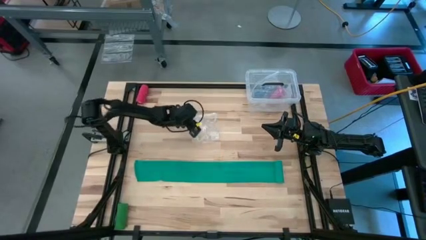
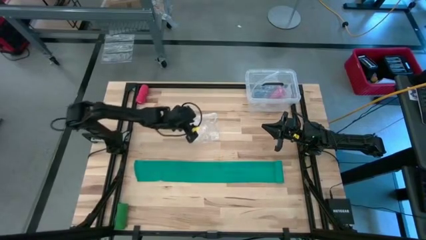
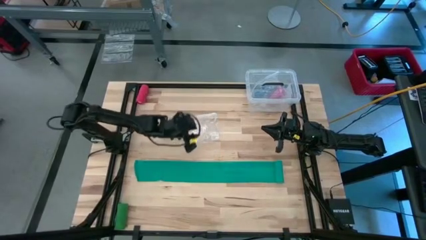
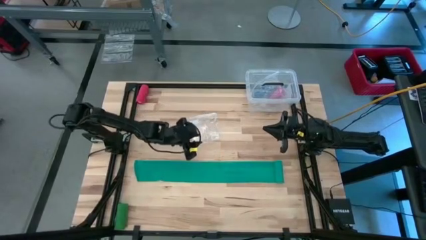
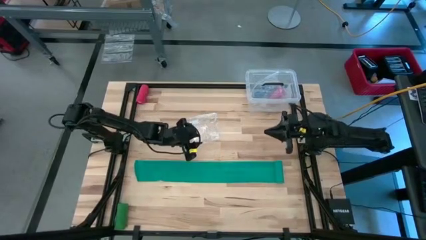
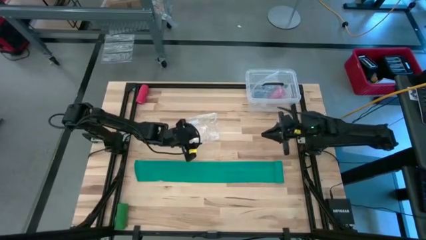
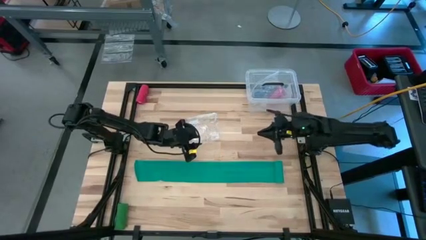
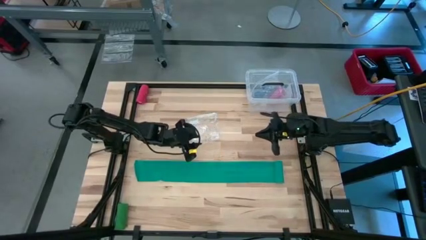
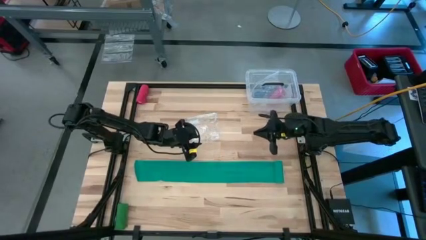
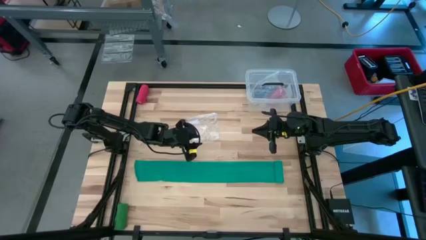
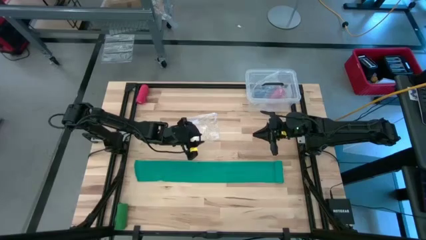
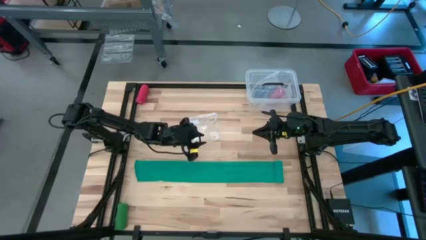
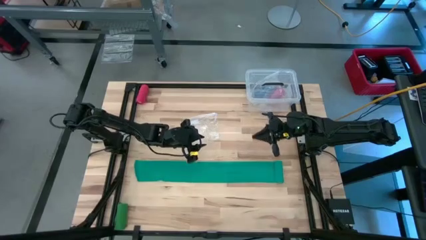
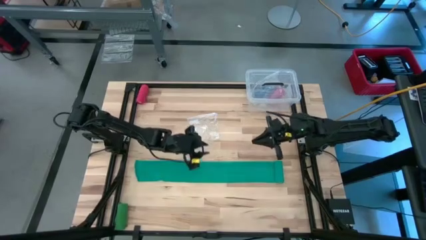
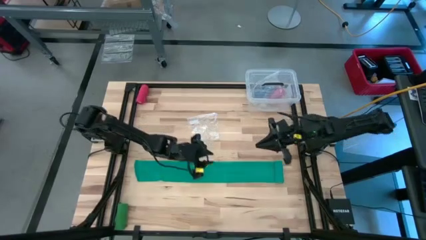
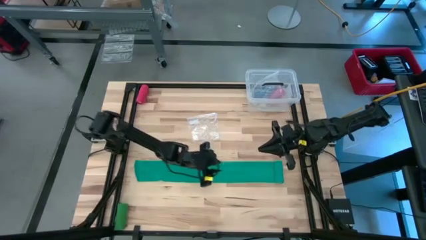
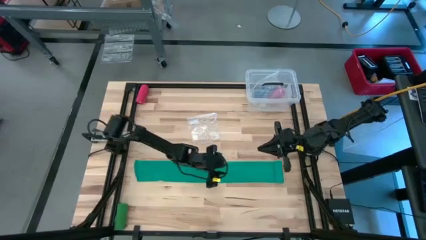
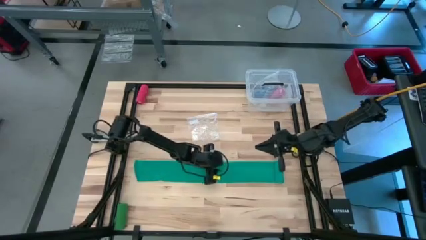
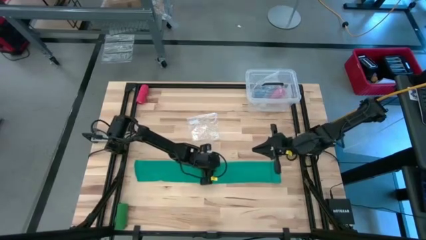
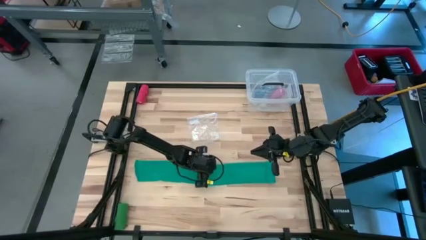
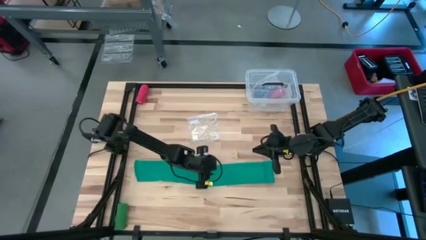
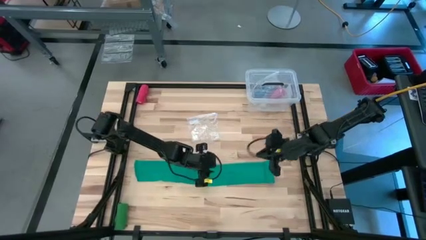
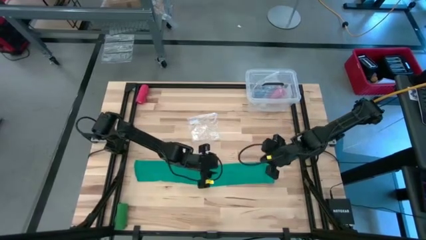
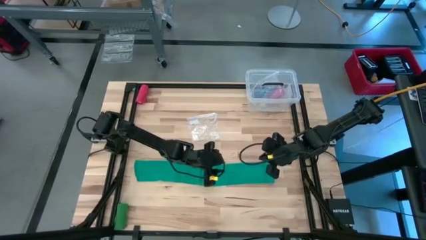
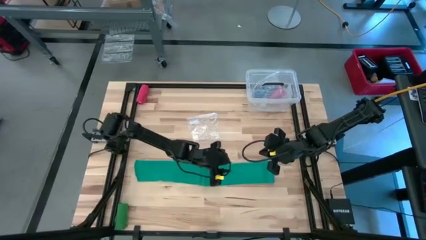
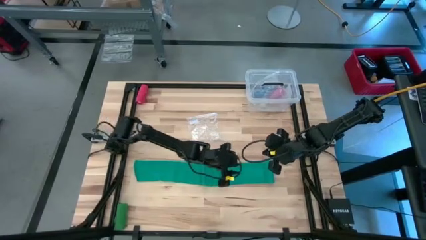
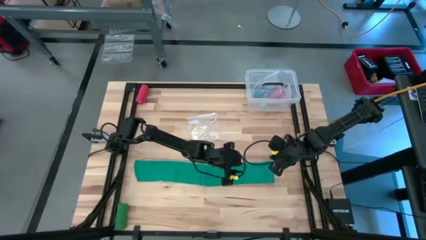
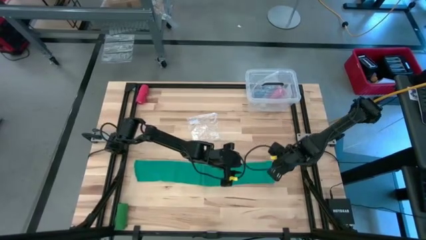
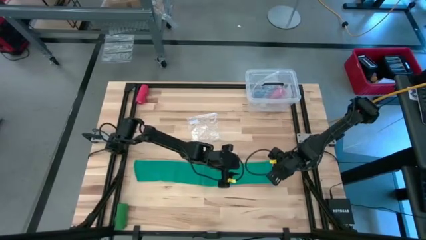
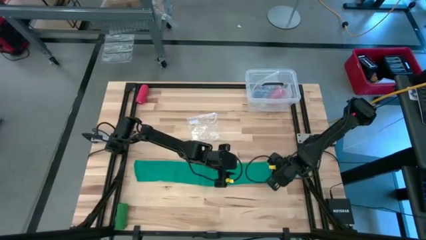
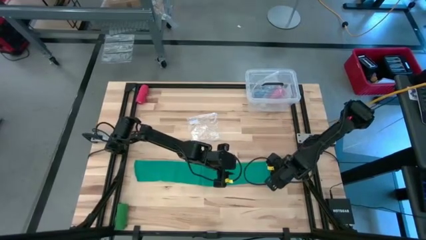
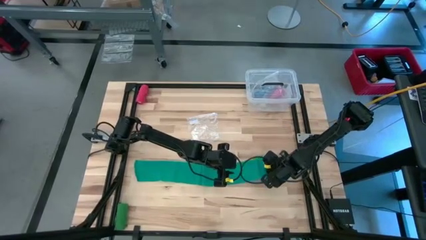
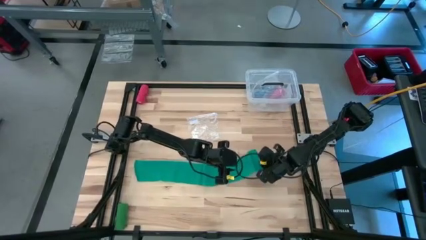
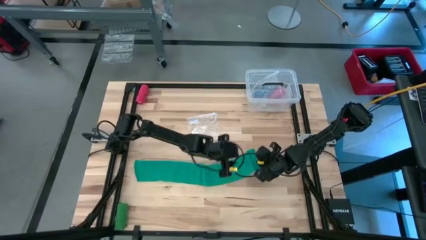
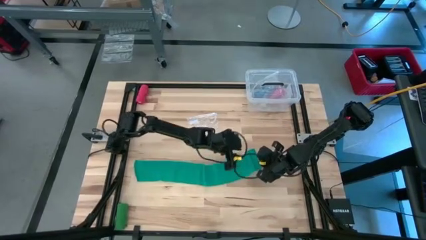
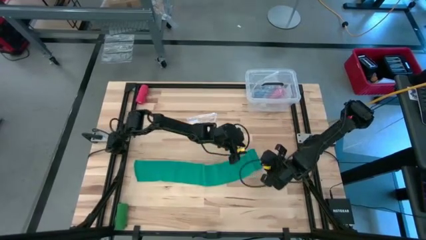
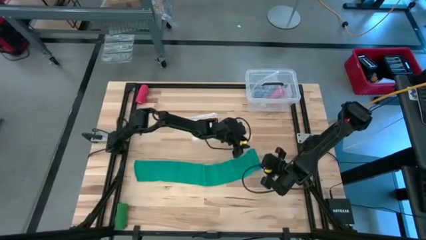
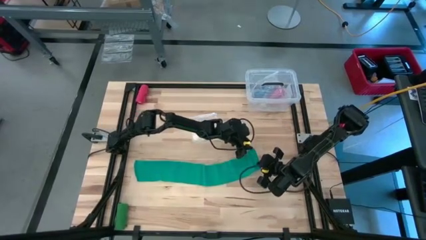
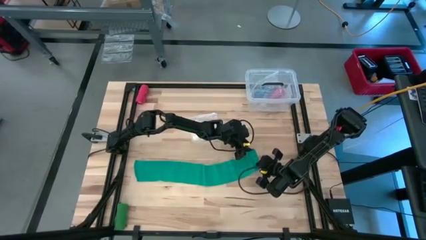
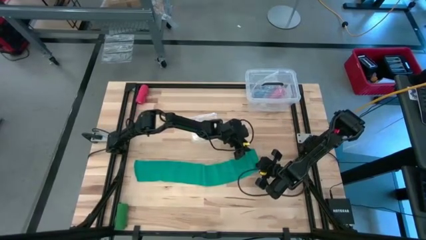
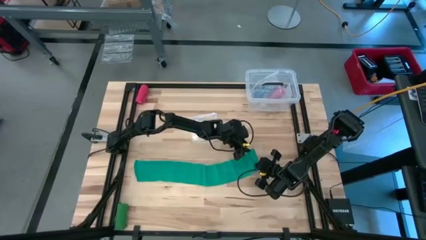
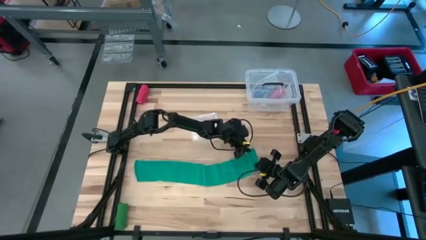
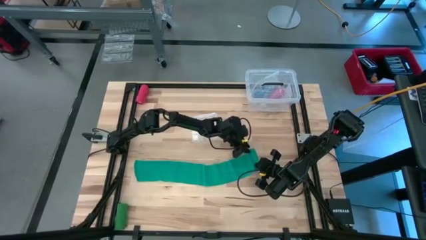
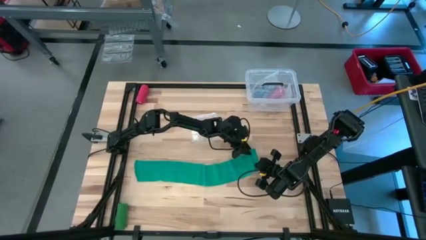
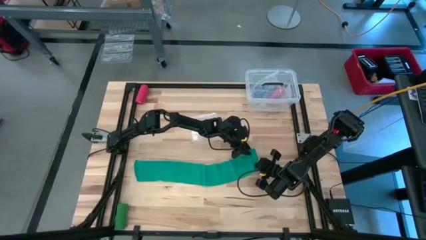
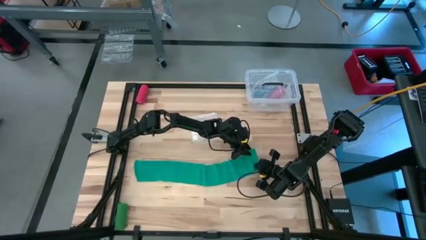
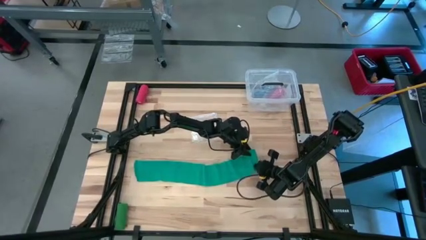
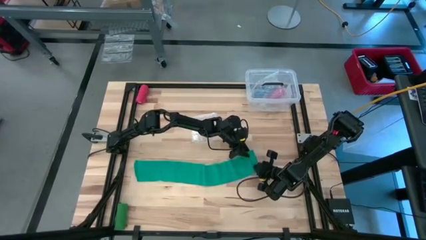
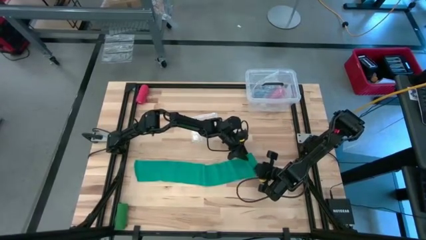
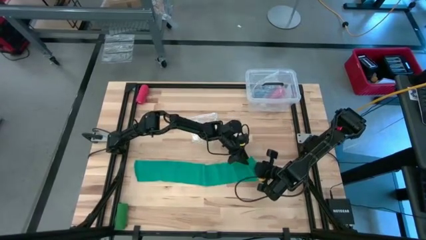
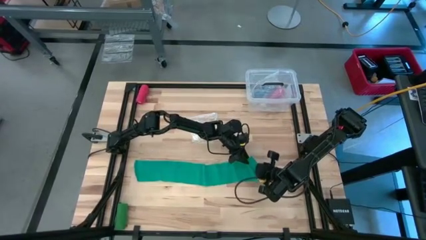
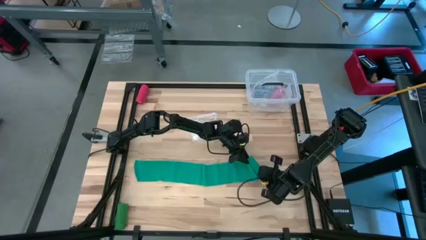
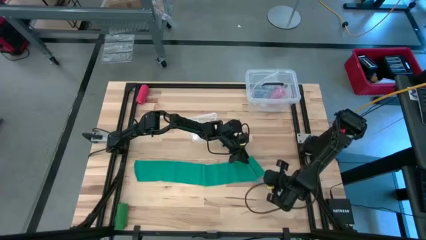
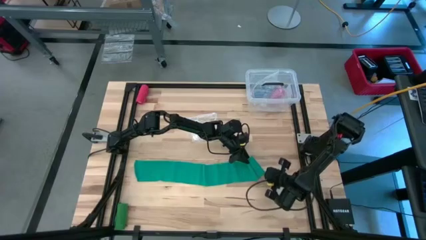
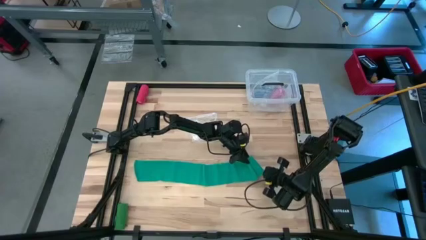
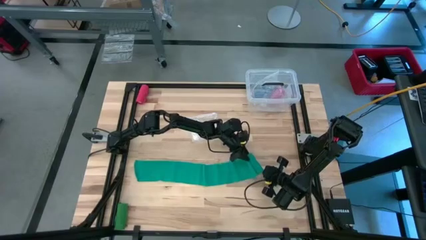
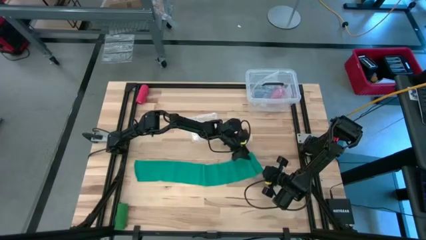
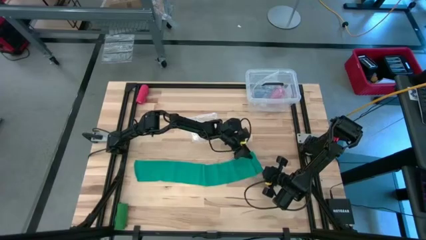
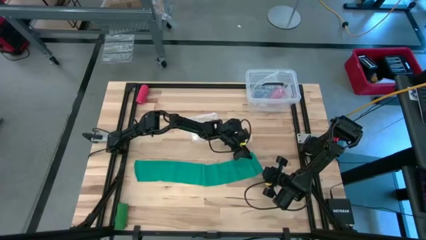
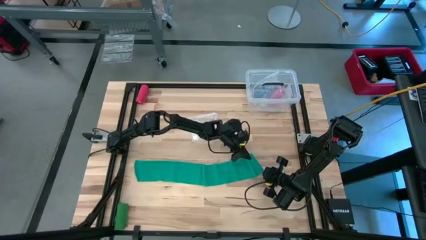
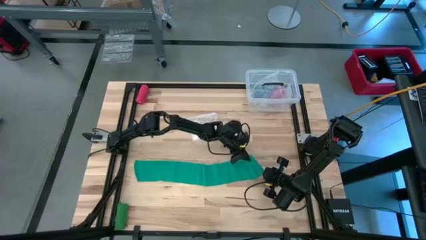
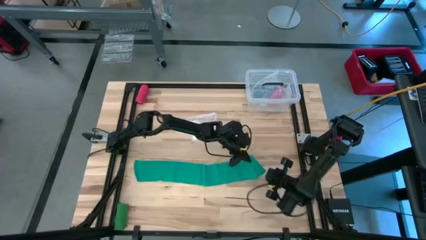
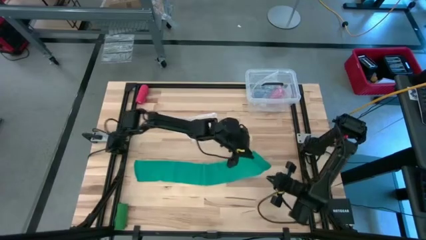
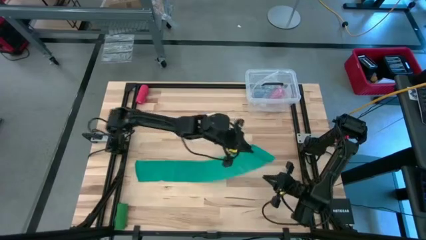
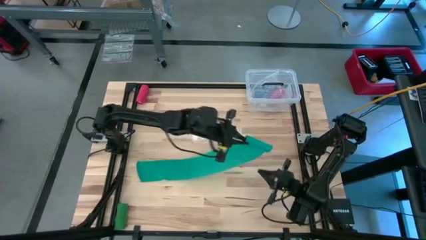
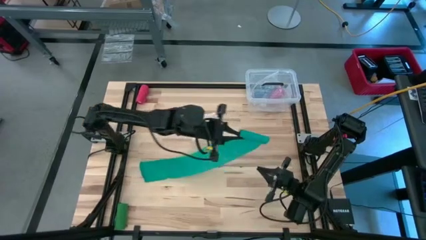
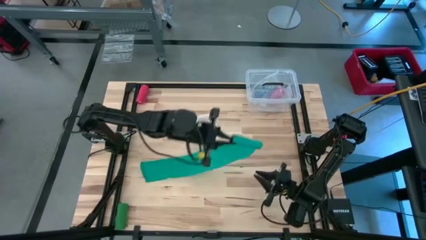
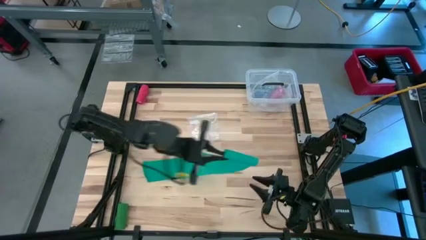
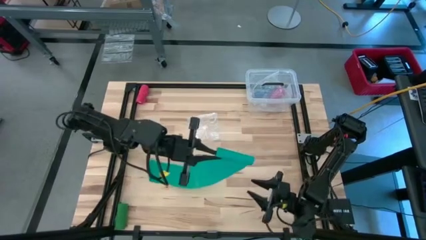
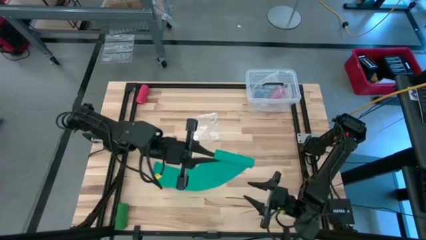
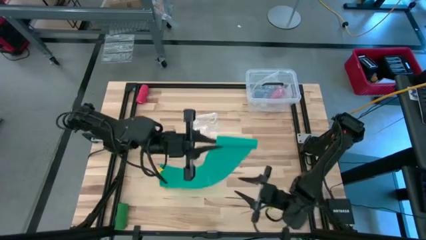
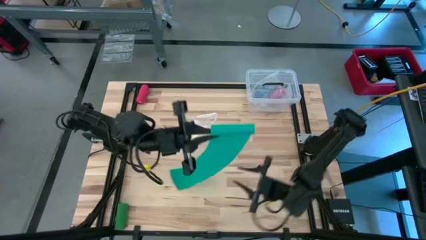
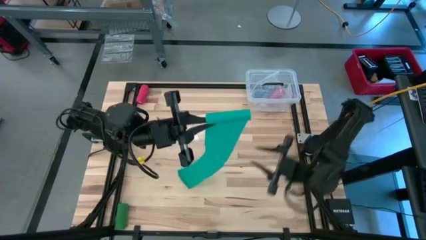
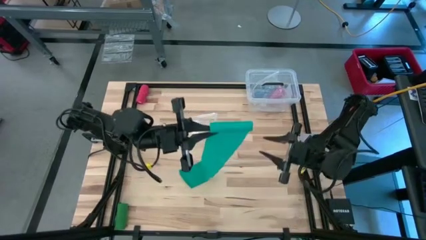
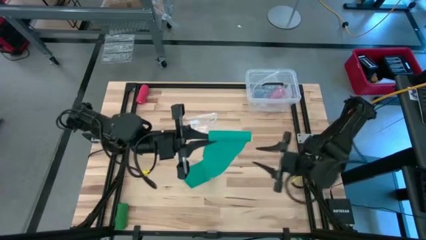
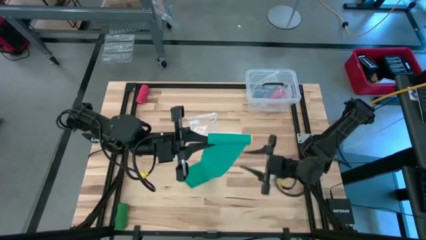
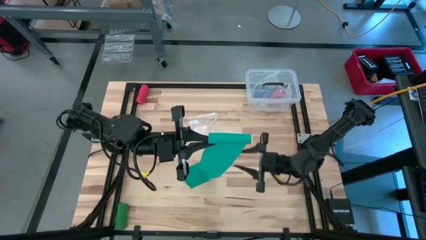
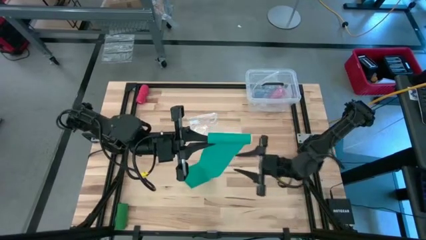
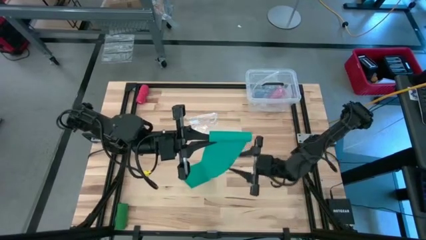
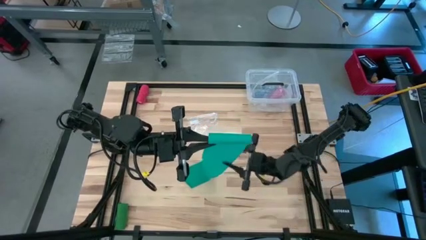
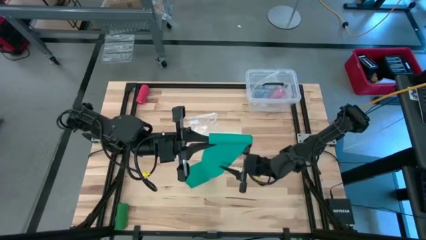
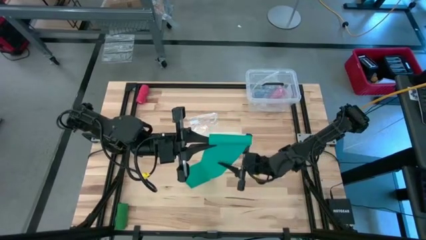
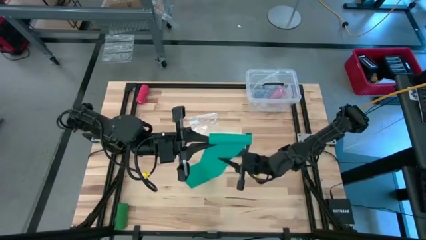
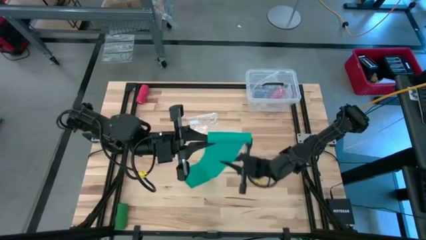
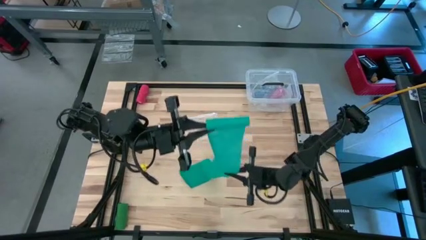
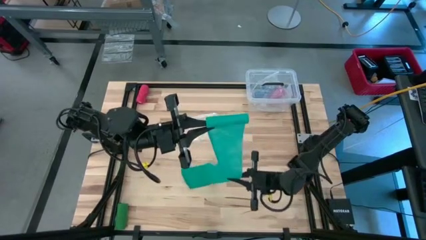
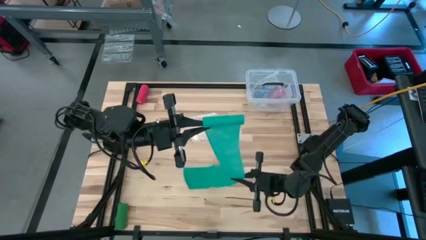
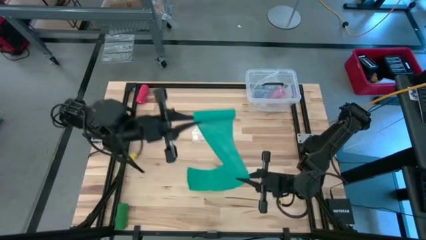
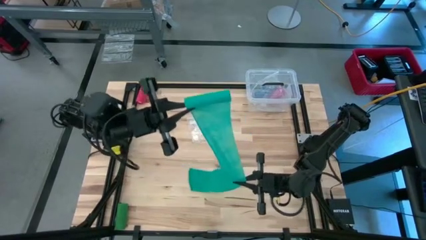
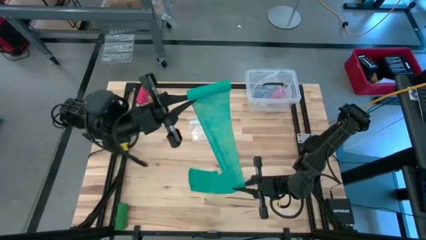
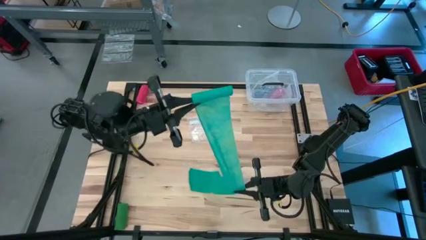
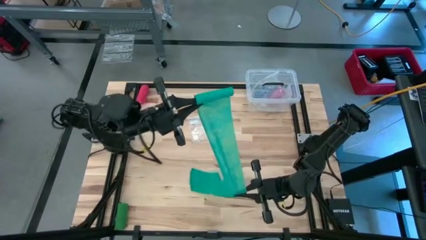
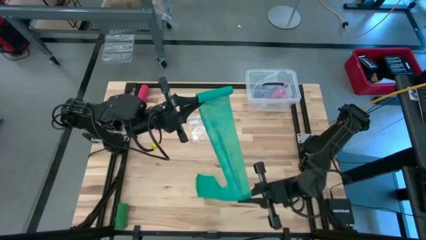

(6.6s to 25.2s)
Task: Roll bandage
Roll the green bandage
